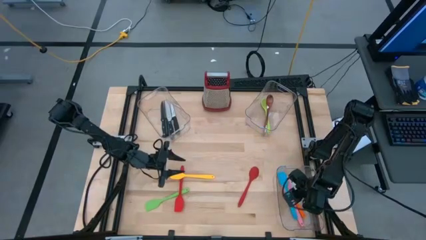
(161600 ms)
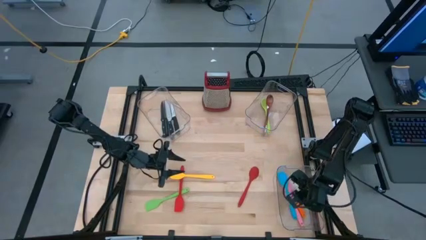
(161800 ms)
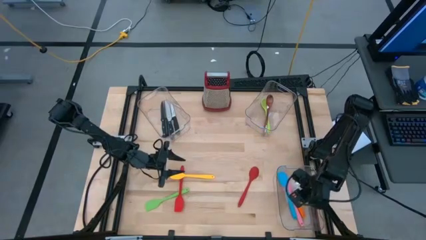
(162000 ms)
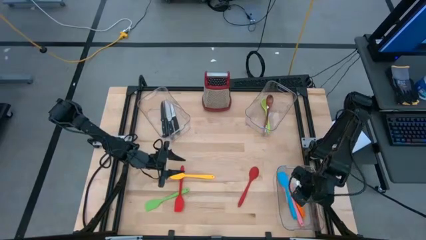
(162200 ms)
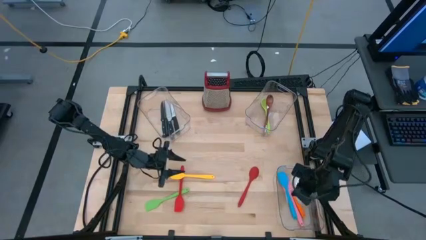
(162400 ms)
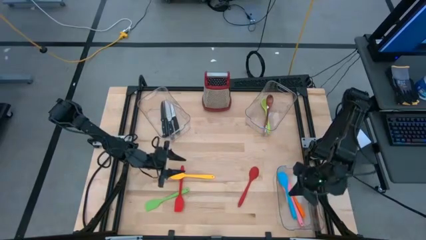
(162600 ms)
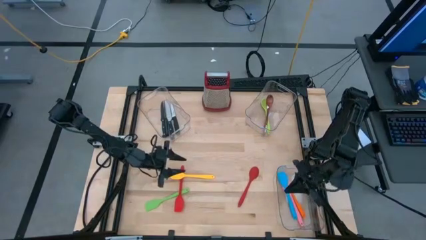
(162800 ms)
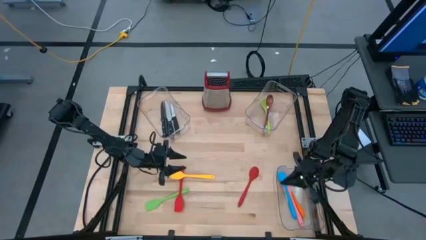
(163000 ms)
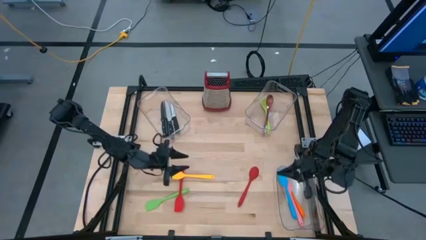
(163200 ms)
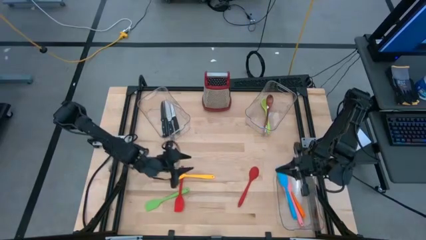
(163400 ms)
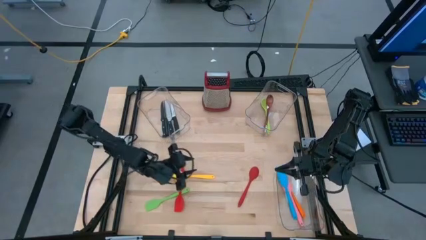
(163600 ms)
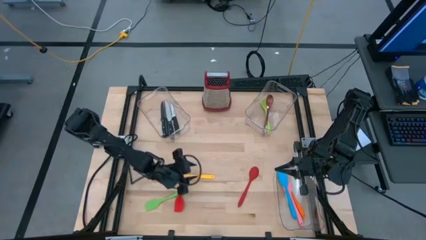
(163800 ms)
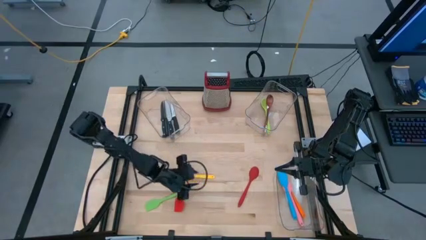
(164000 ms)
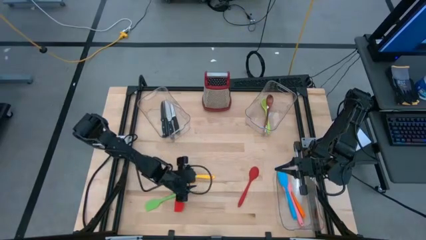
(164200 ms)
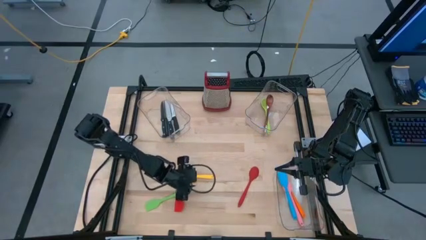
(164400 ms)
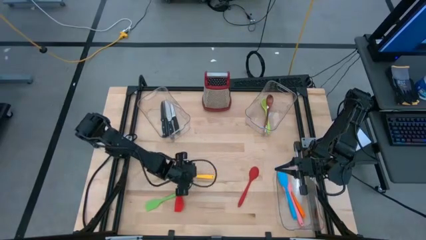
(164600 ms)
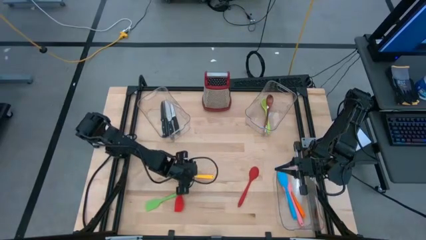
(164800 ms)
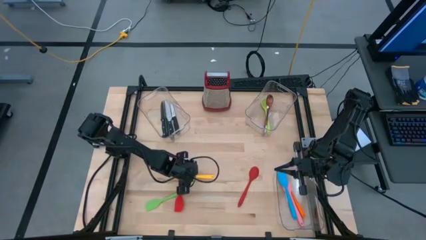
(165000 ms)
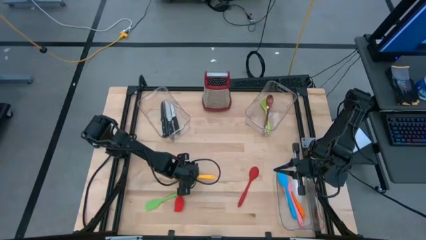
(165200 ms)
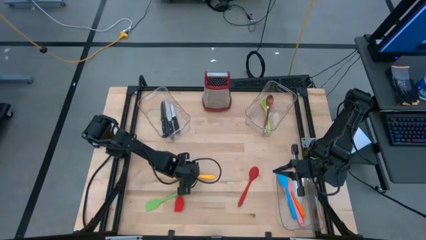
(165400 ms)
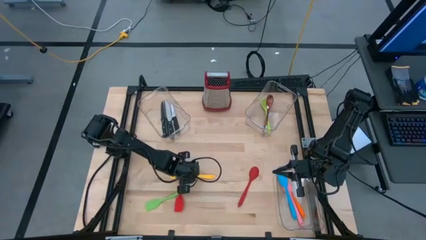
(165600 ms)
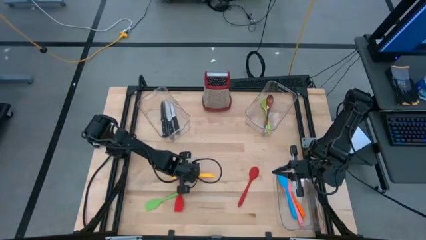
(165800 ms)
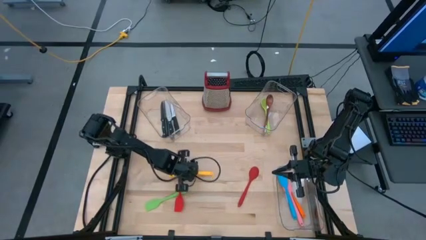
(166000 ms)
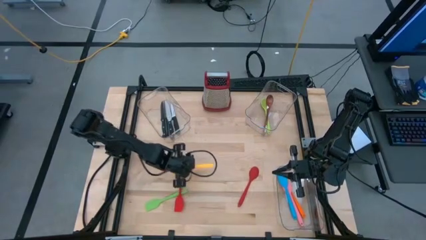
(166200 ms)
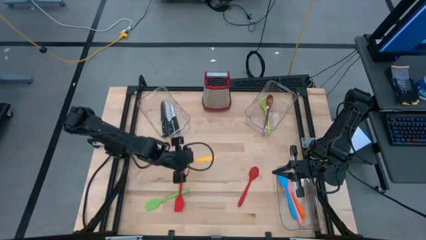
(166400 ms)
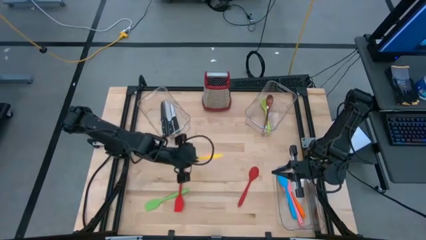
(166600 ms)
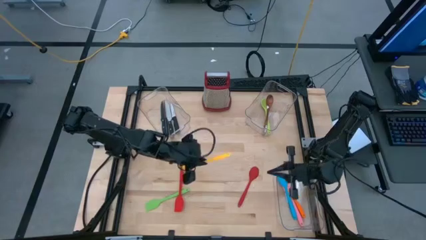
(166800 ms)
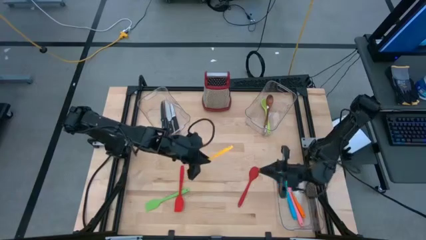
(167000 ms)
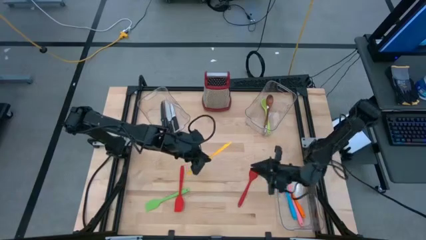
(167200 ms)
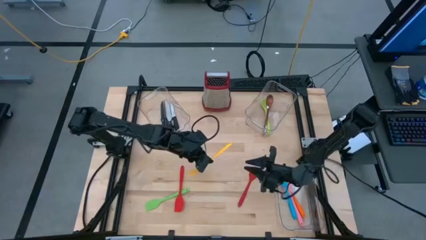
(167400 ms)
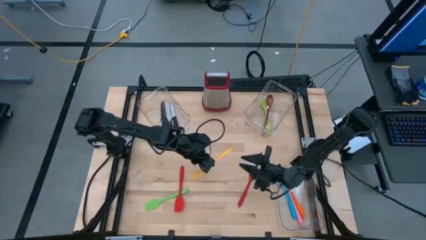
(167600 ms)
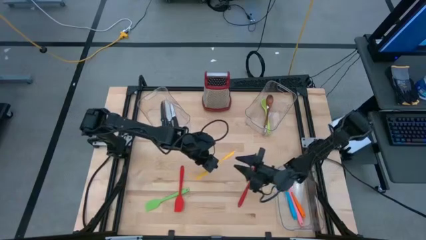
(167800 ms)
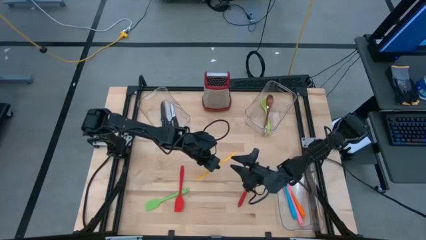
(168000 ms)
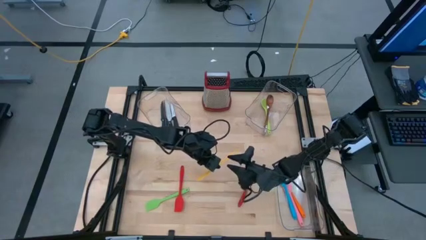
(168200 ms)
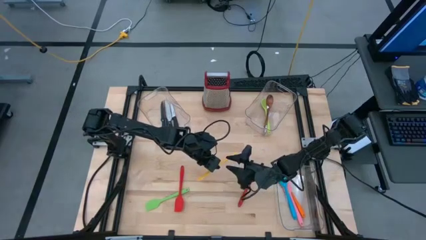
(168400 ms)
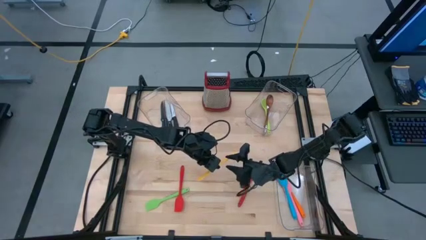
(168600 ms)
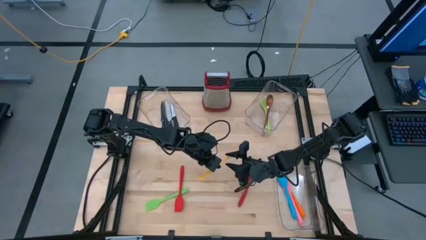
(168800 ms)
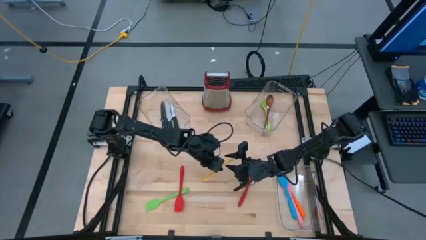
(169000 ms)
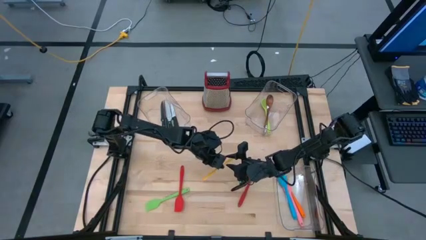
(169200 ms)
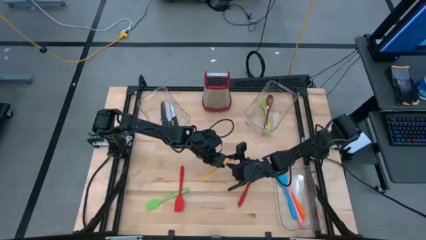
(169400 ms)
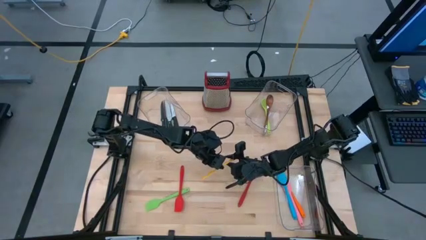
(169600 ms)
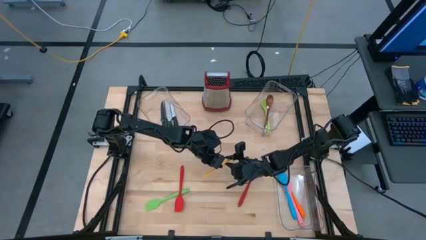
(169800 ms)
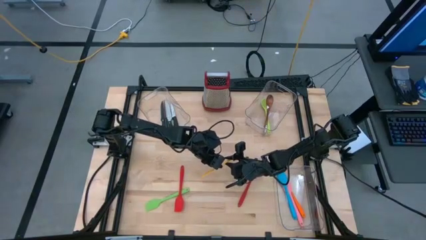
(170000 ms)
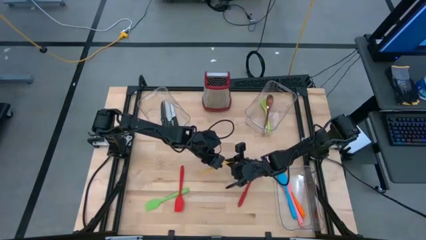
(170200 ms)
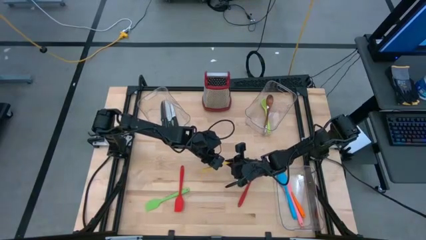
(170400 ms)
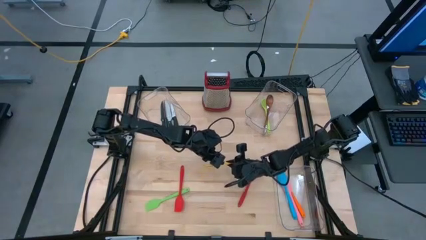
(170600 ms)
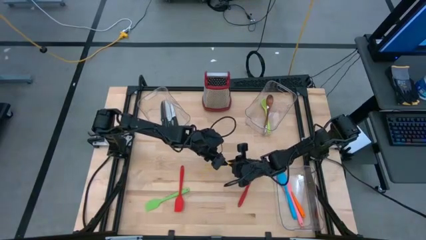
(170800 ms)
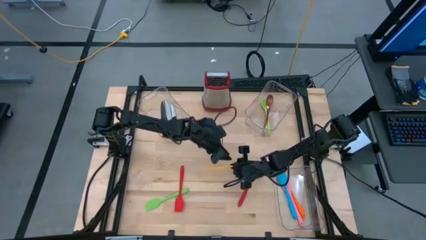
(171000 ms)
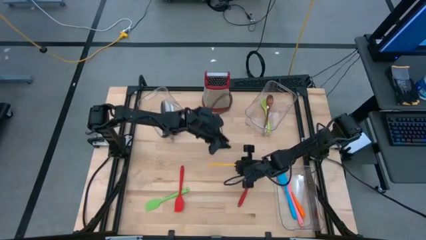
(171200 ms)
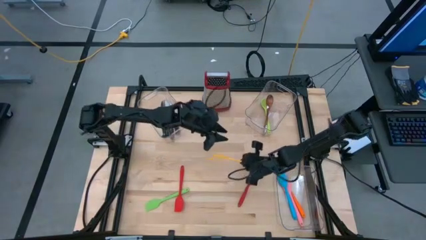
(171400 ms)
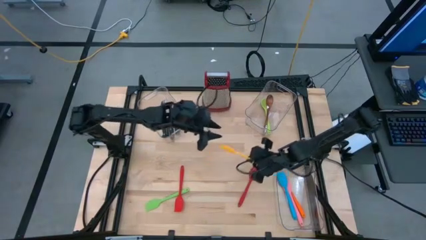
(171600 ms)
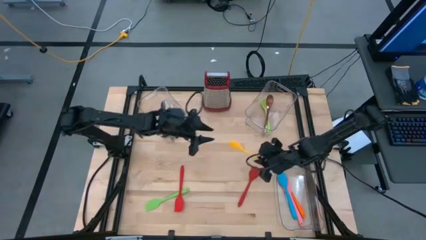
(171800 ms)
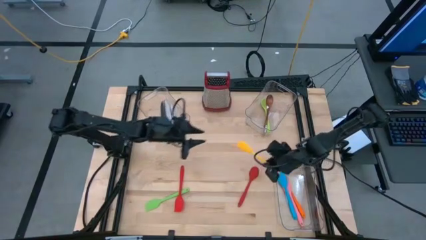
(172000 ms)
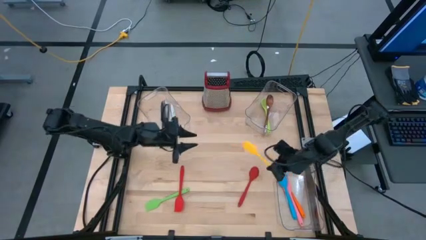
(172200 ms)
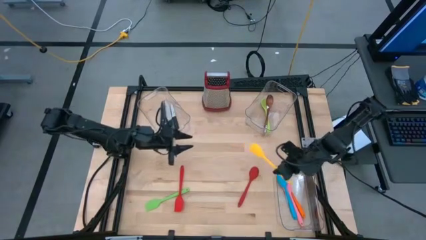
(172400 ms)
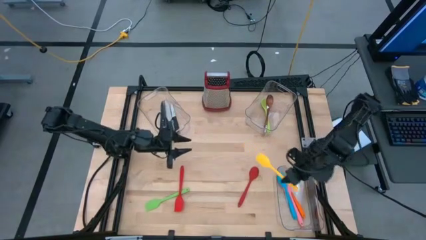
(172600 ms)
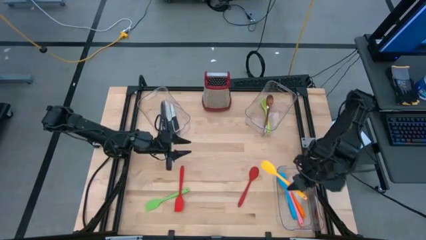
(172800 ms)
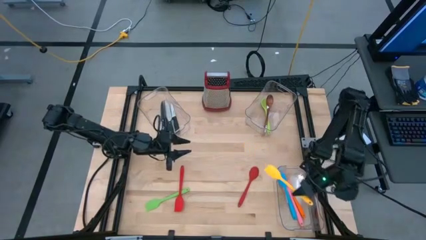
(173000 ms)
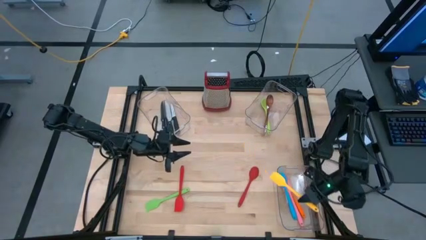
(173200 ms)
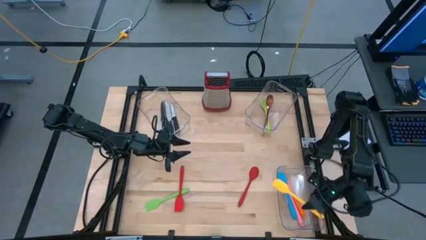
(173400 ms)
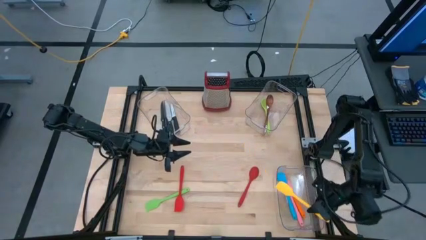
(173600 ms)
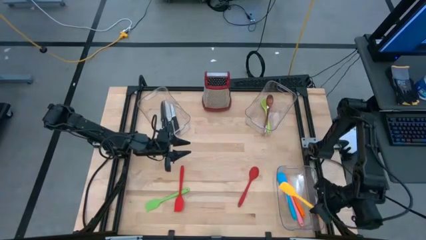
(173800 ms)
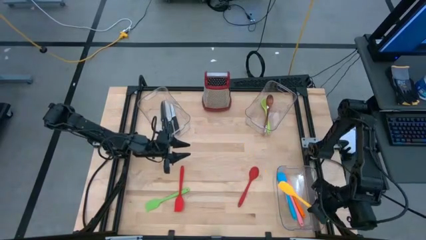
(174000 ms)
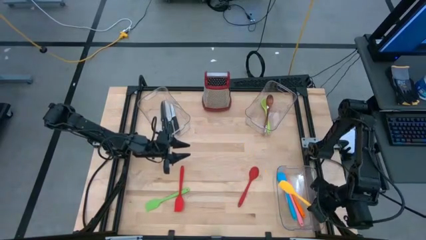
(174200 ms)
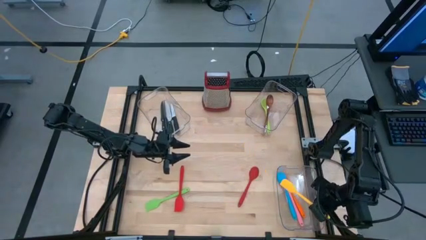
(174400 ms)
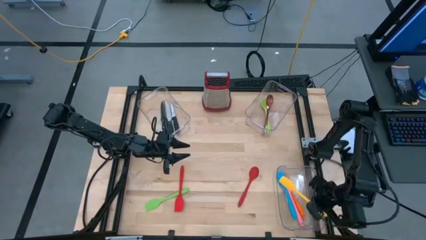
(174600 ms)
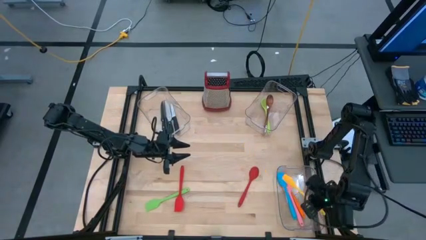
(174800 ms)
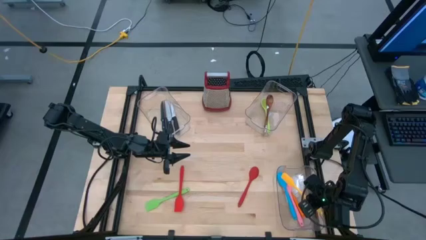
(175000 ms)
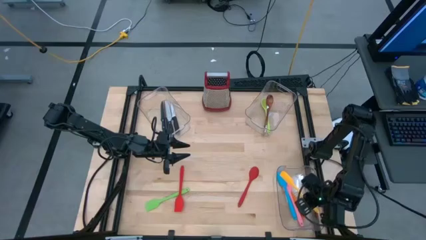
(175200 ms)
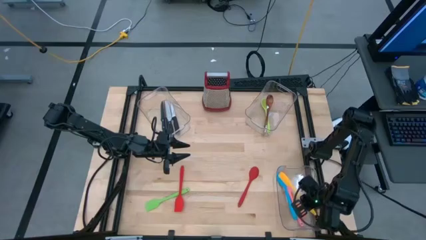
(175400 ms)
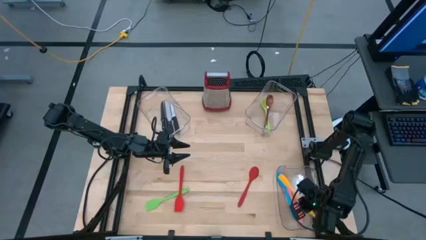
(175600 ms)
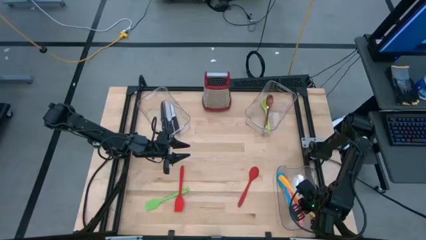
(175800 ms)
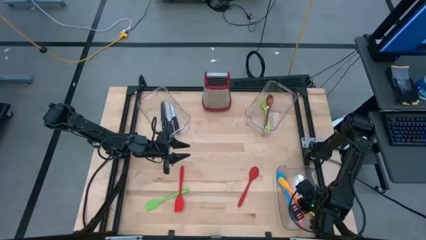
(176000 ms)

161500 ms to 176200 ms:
Task: Pick & Place Kitchen Items
Put the yellow spatula into the bottom right transparent bin
